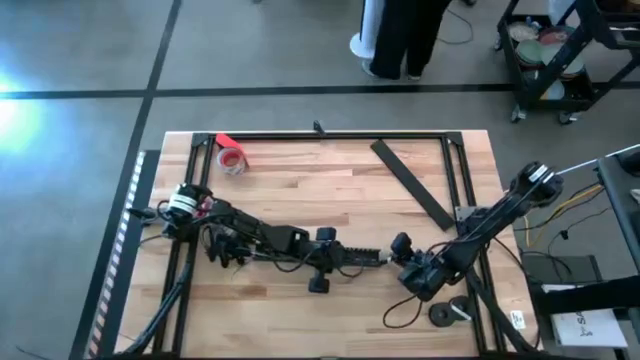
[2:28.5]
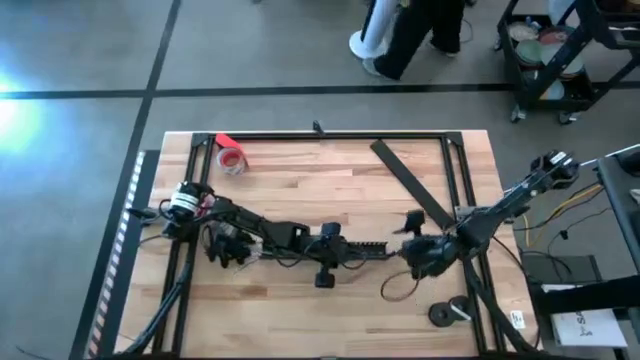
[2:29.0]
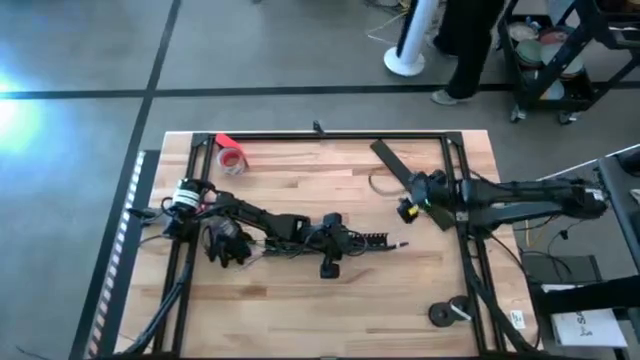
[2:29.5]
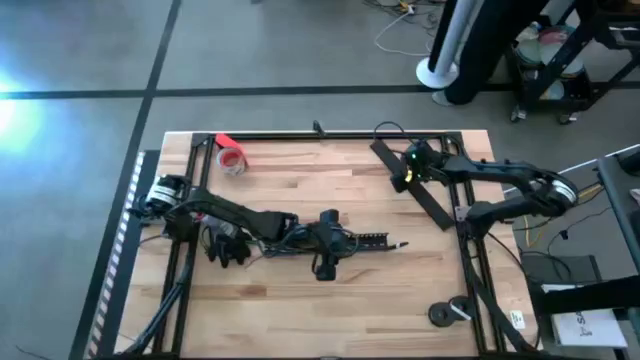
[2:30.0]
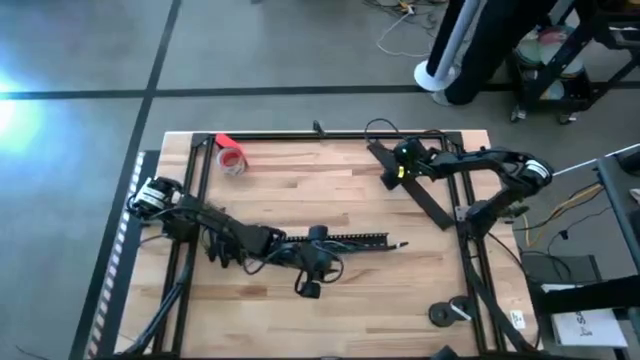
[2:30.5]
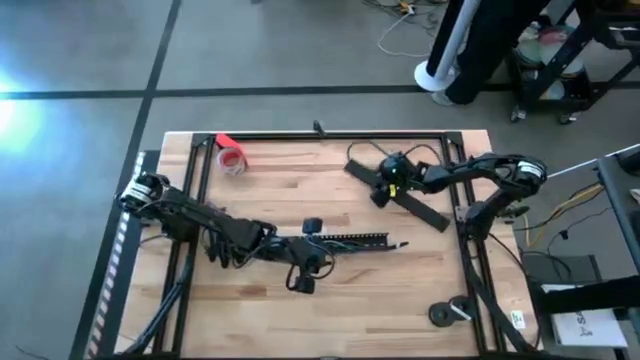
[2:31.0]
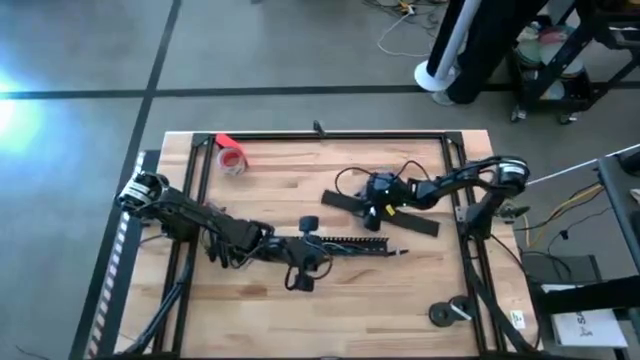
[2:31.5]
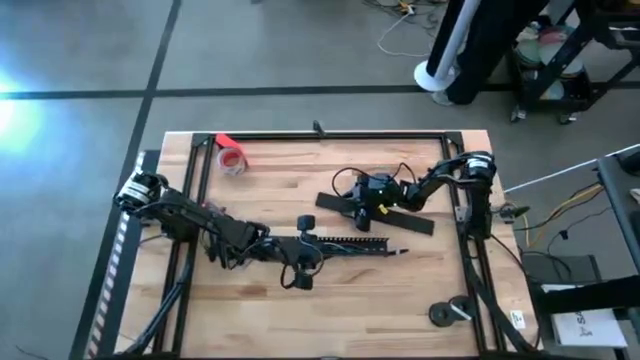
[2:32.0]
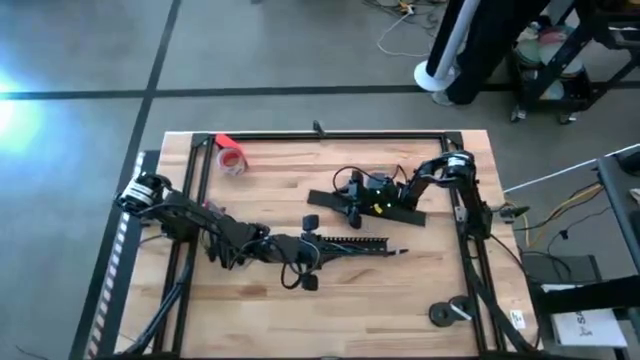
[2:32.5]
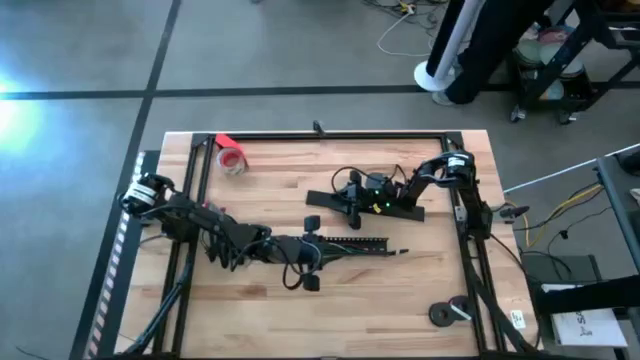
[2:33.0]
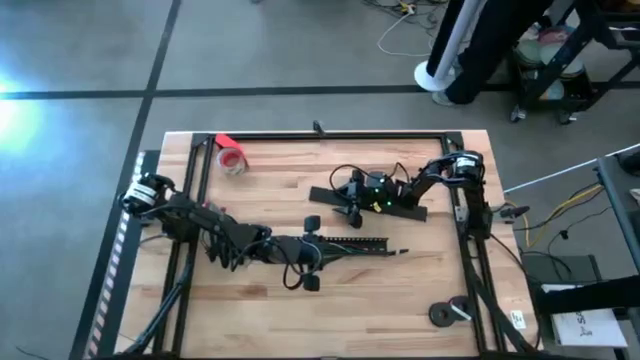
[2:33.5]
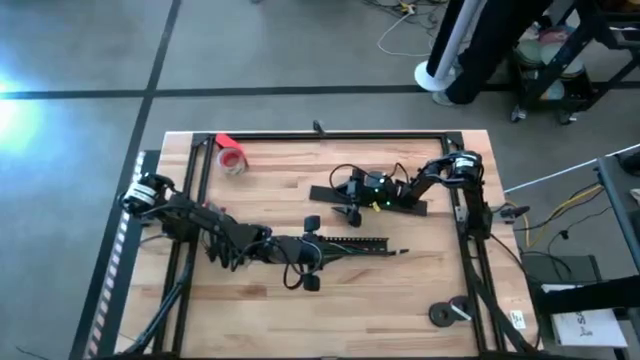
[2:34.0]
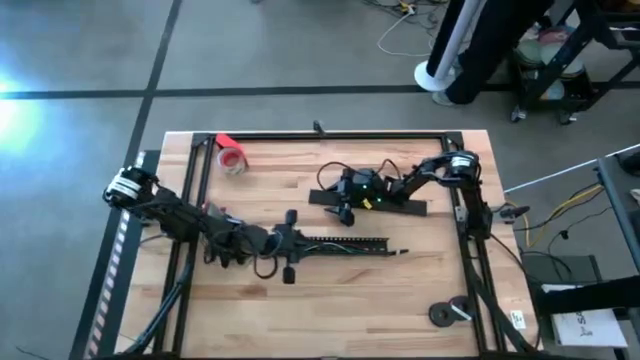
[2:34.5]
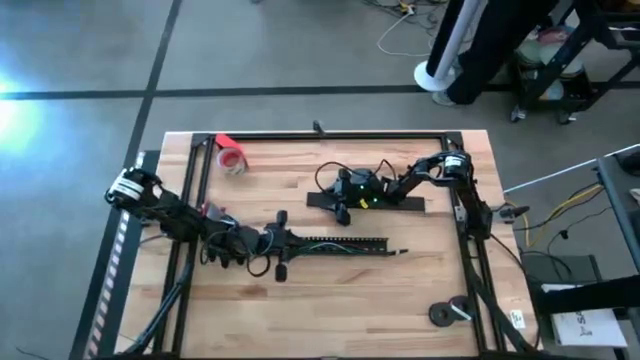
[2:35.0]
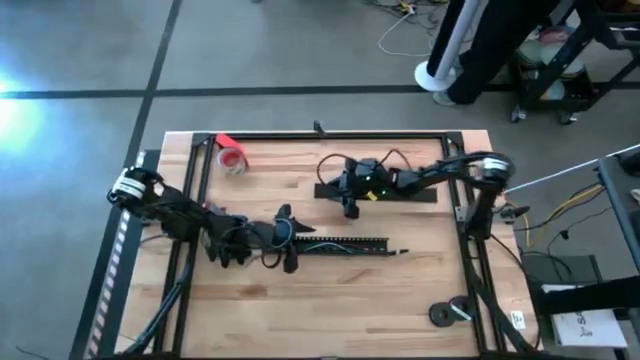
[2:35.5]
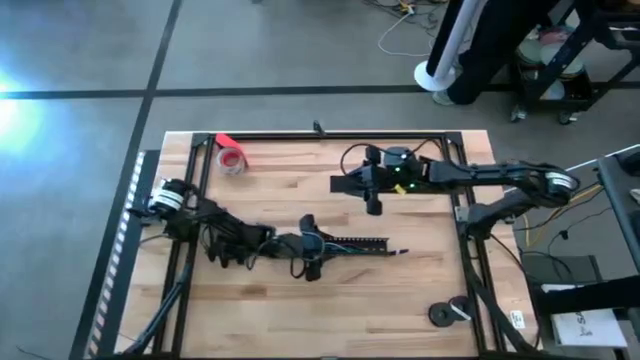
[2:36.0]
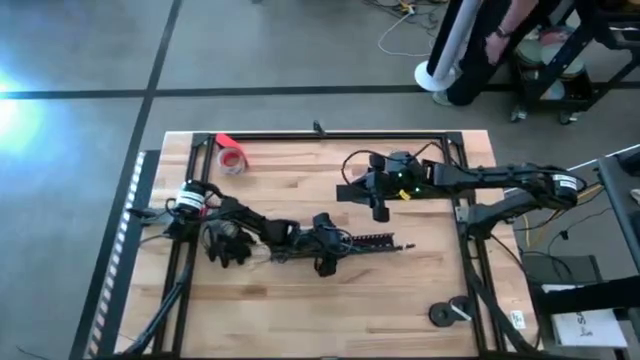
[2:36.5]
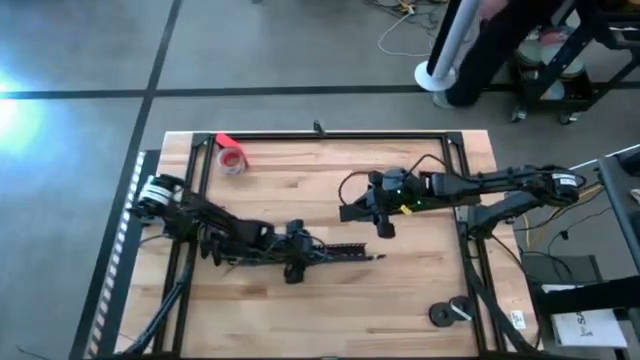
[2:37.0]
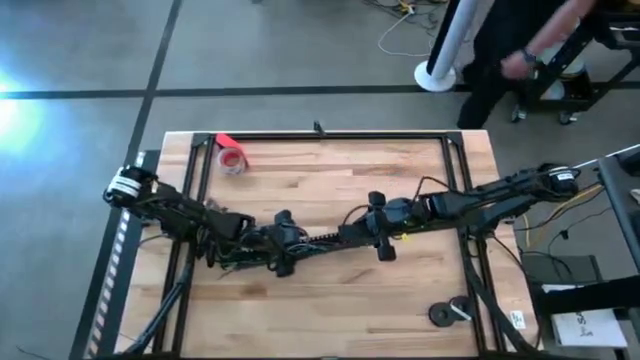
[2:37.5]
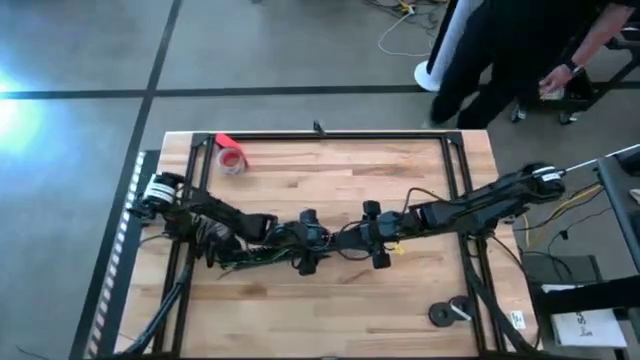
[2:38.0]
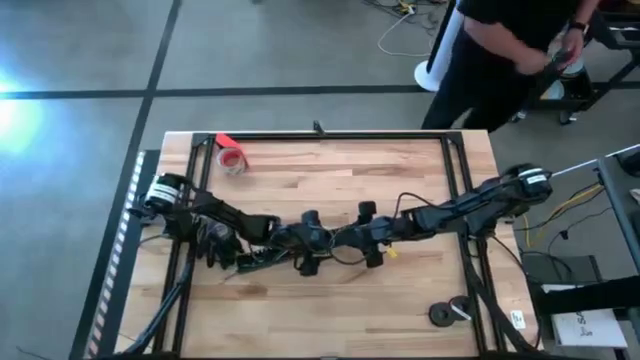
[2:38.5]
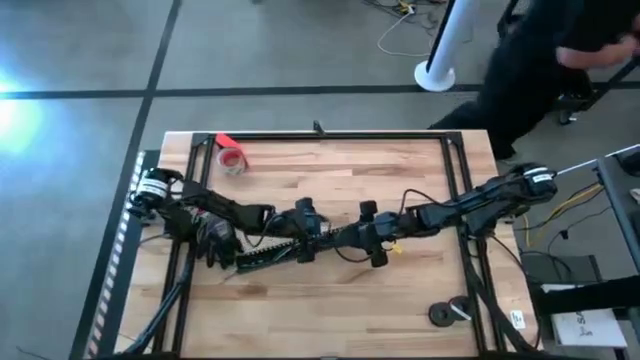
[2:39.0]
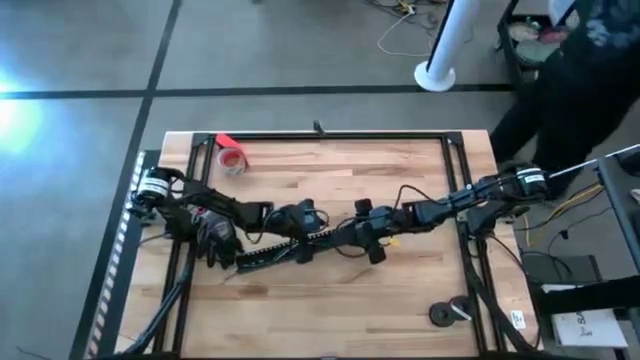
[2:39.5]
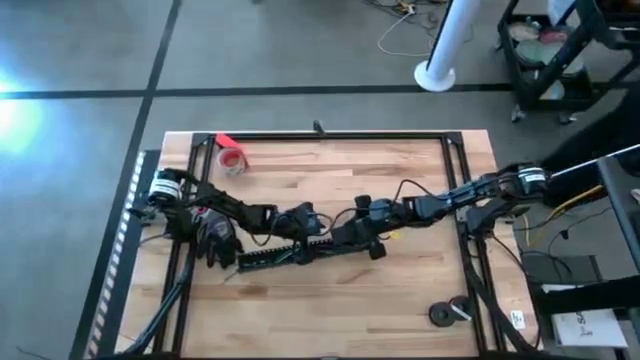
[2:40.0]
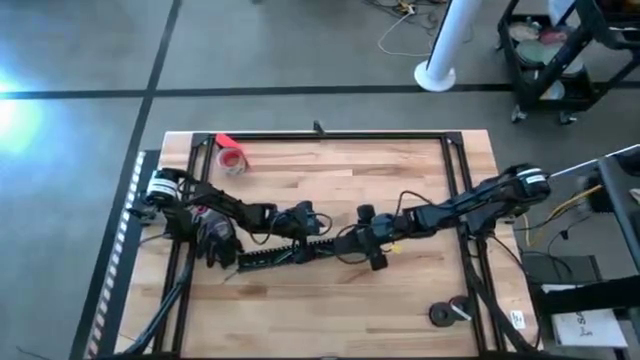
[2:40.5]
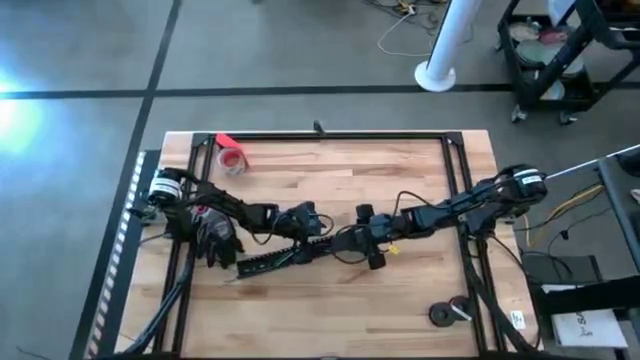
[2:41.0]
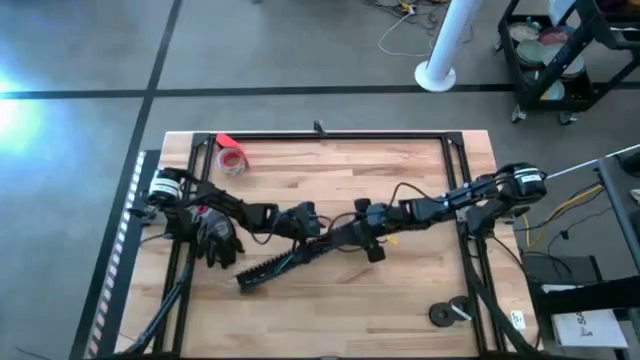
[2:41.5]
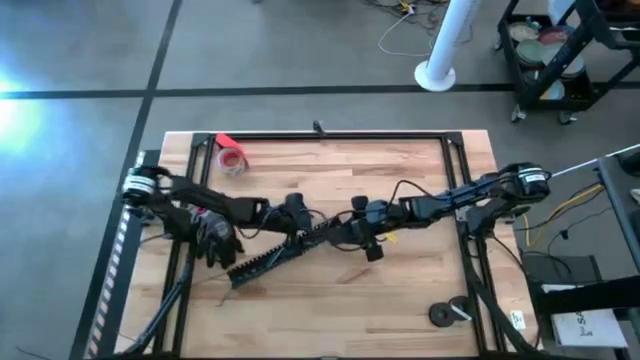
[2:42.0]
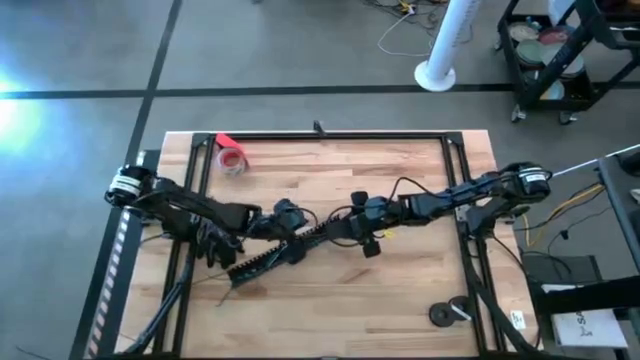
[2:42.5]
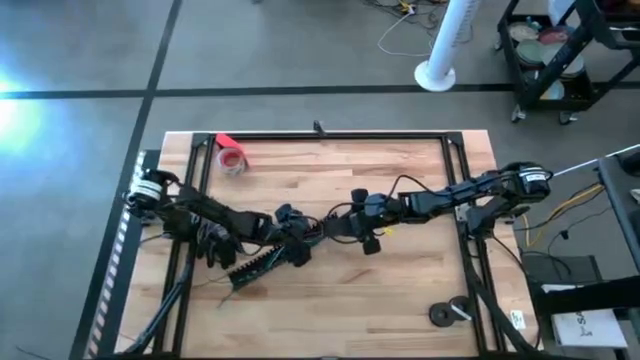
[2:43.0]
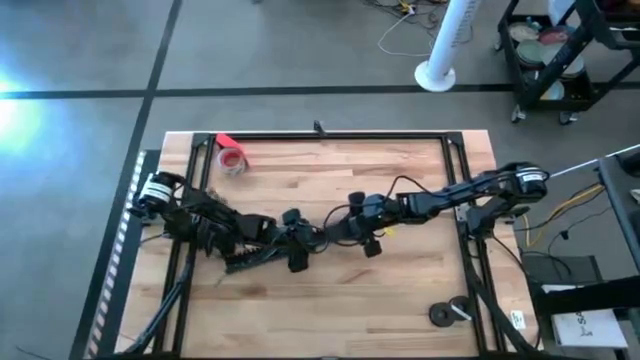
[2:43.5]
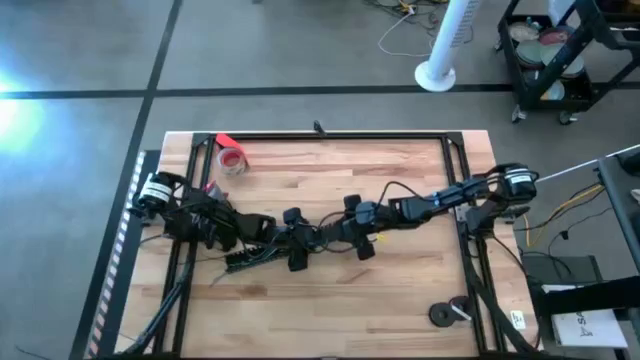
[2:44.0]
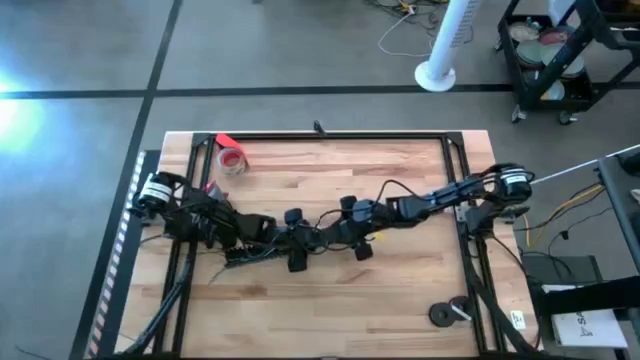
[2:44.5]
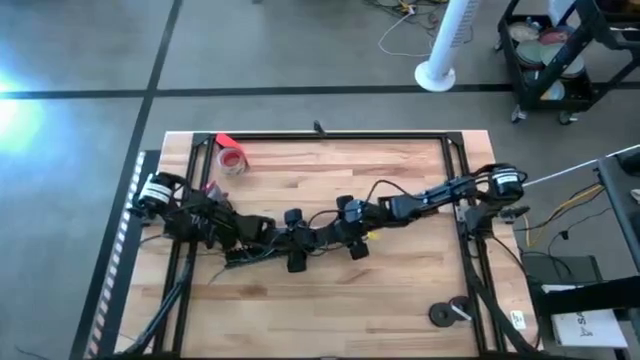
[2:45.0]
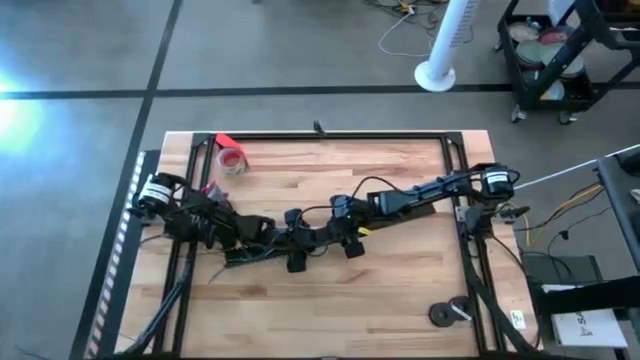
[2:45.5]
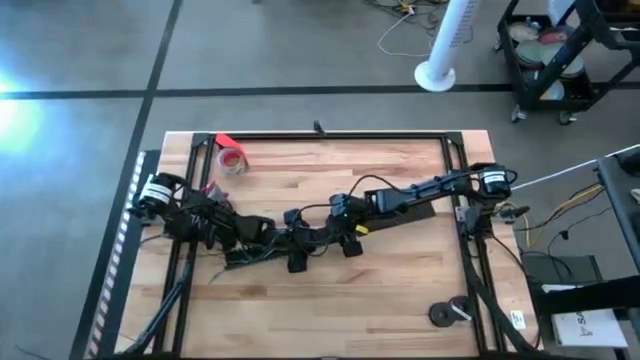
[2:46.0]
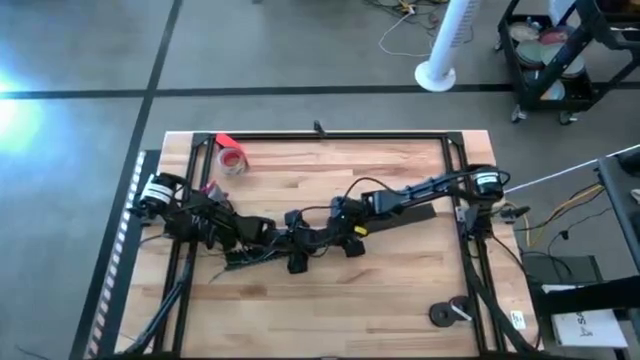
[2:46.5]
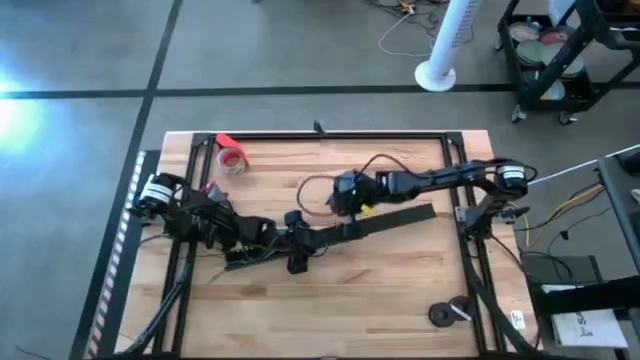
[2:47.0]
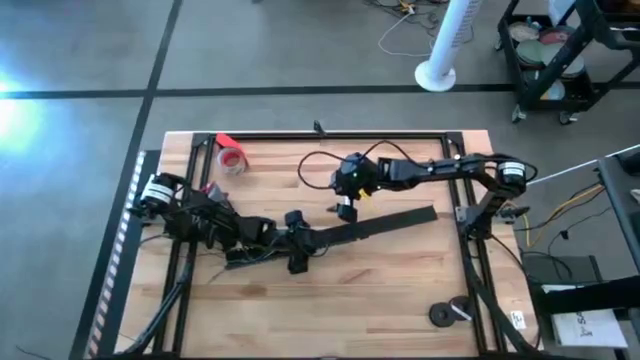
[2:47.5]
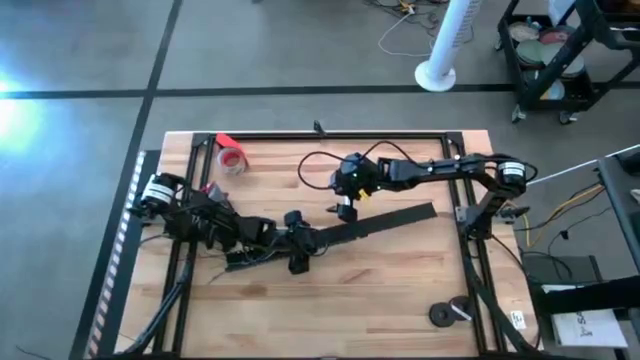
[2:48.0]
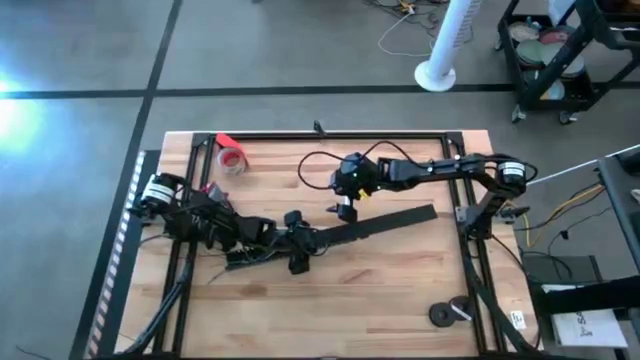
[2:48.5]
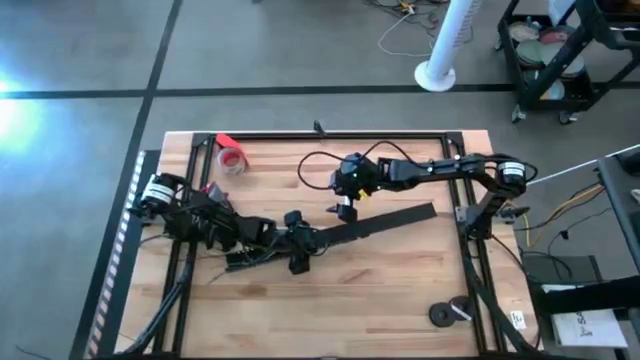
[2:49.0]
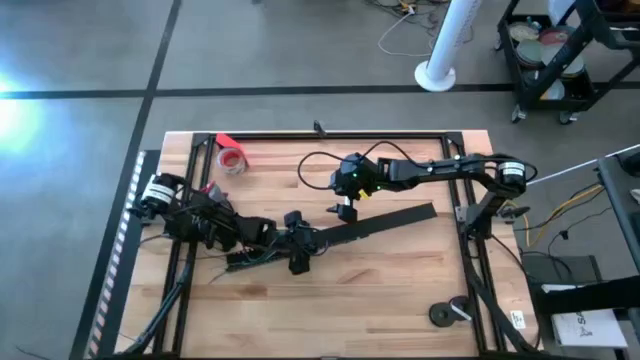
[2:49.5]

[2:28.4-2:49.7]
Task: Ziptie cables
Close the black cable duct
